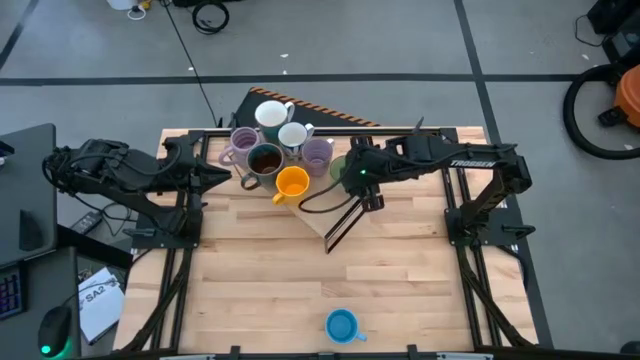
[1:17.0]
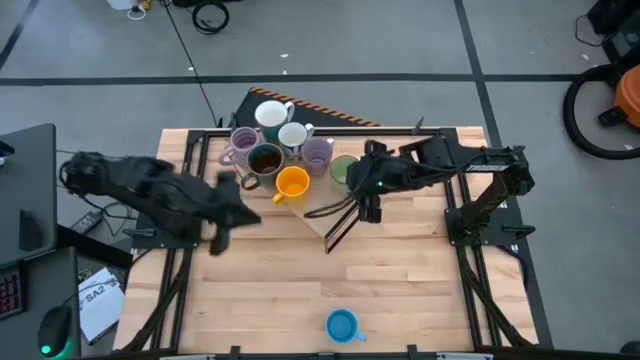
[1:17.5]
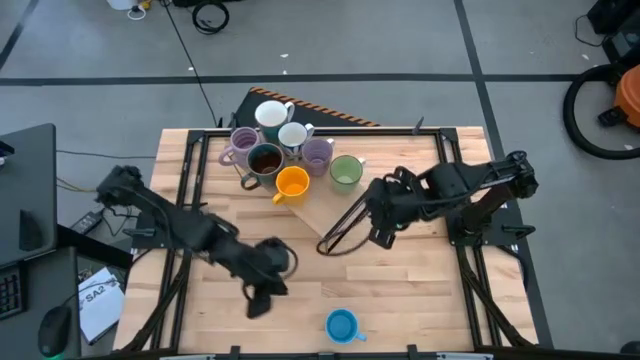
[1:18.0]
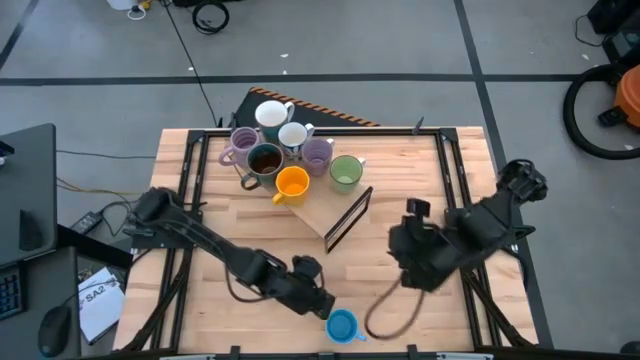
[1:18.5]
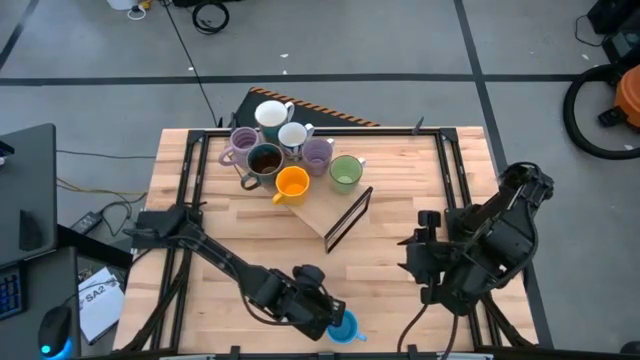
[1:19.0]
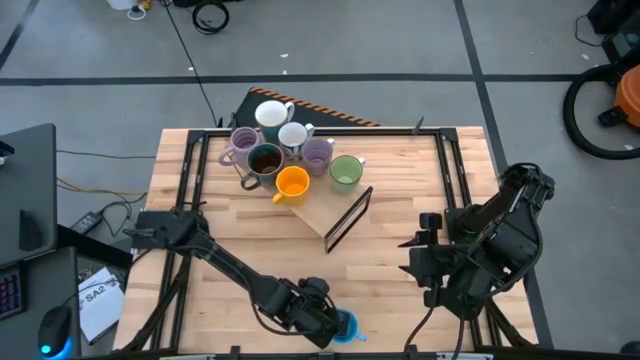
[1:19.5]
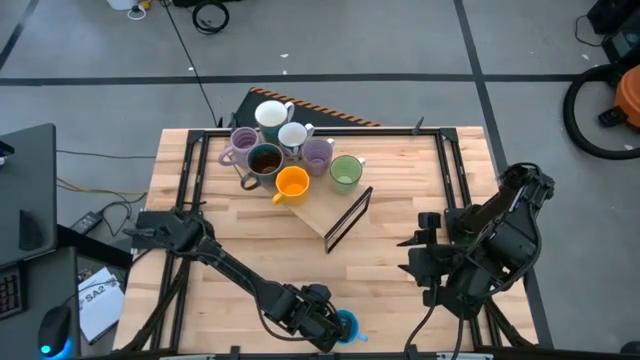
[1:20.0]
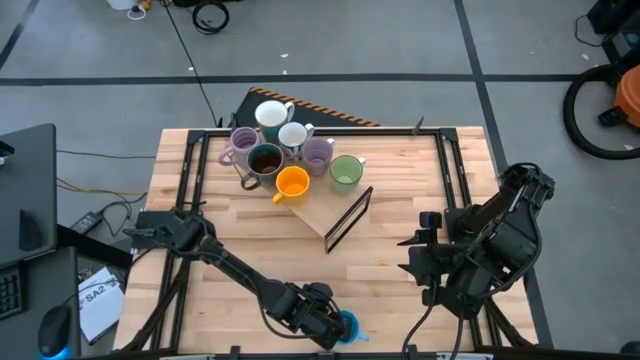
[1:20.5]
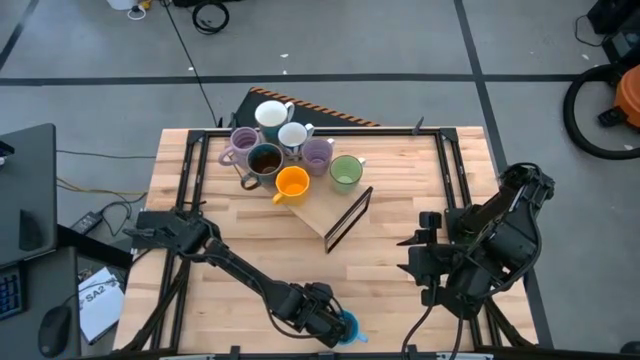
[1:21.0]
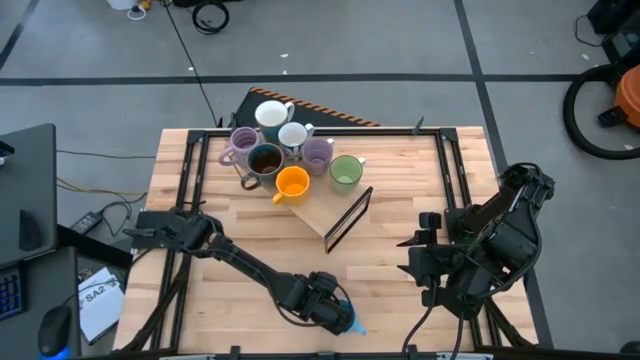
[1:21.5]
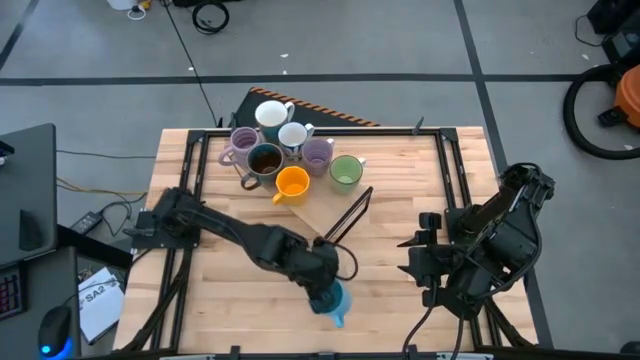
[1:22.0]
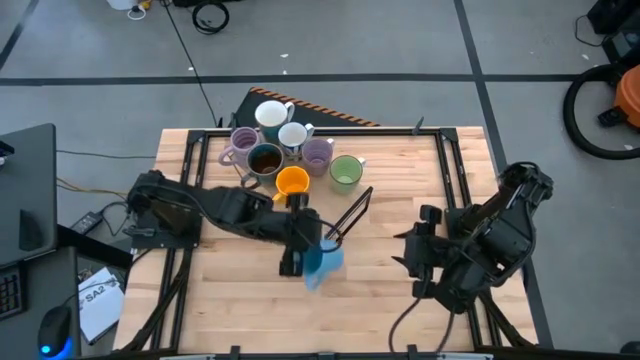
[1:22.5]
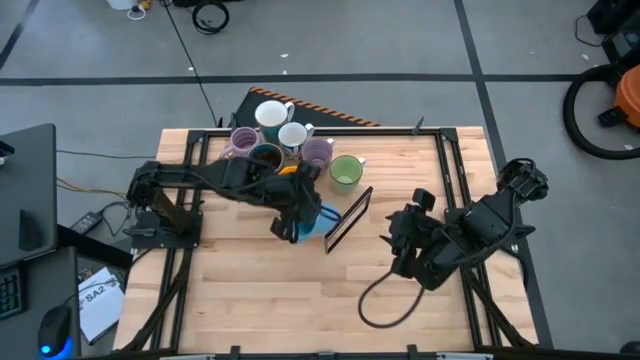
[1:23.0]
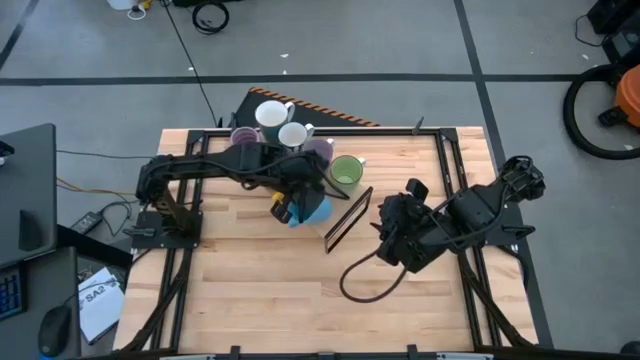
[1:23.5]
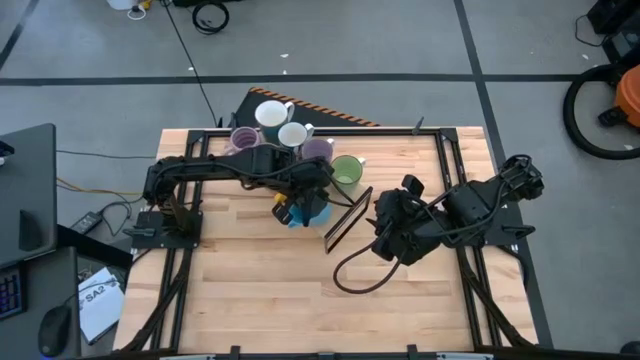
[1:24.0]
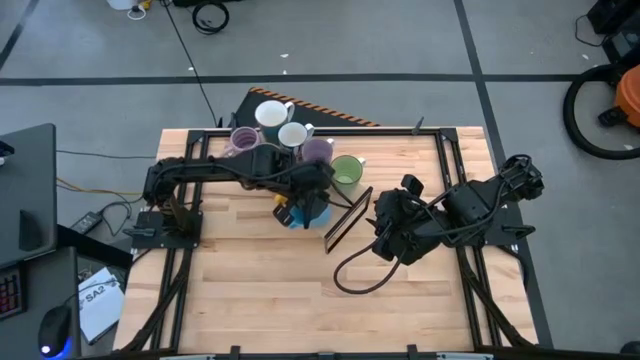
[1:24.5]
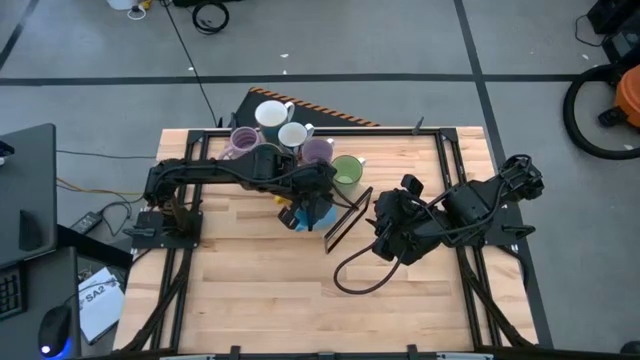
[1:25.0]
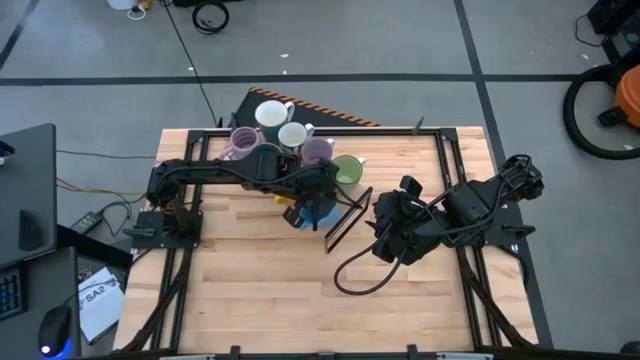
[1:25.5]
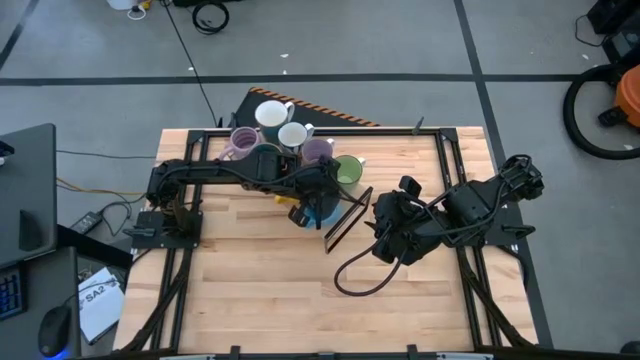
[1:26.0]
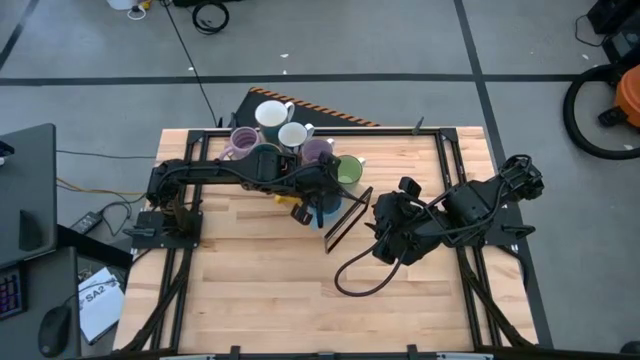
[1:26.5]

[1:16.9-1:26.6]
Task: Place coffee mugs
Put the blue mug on the shelf

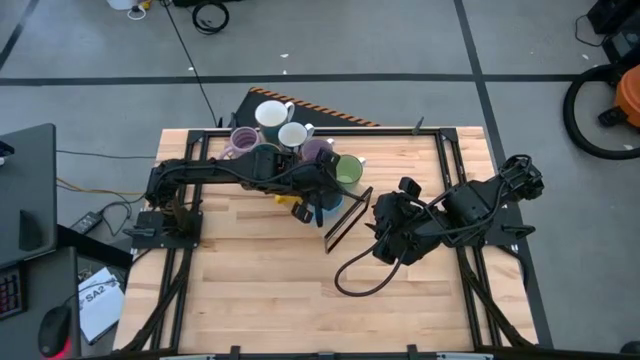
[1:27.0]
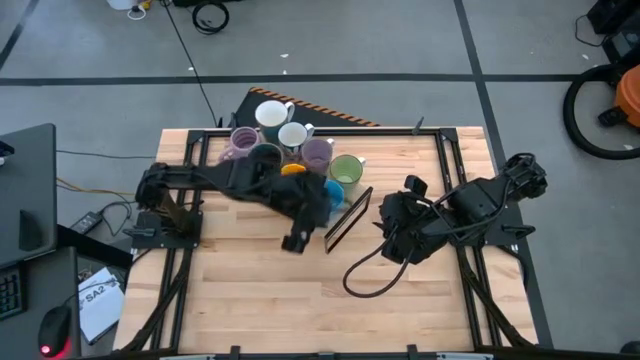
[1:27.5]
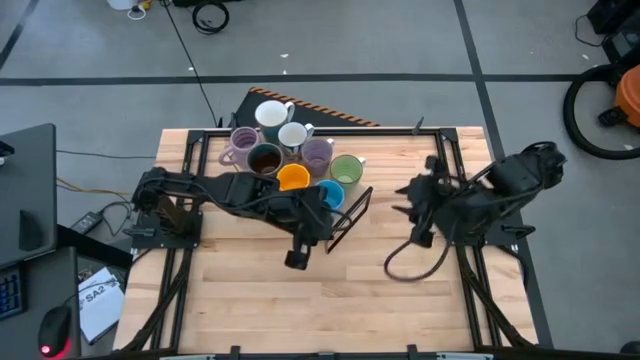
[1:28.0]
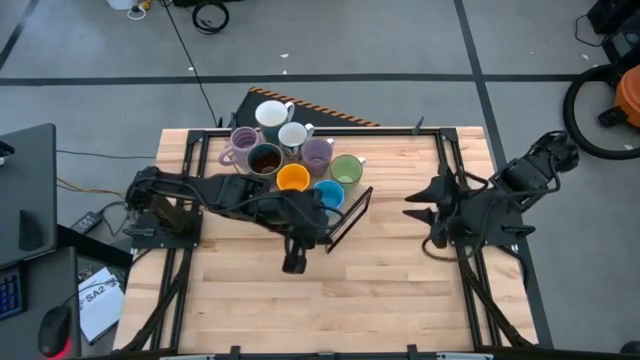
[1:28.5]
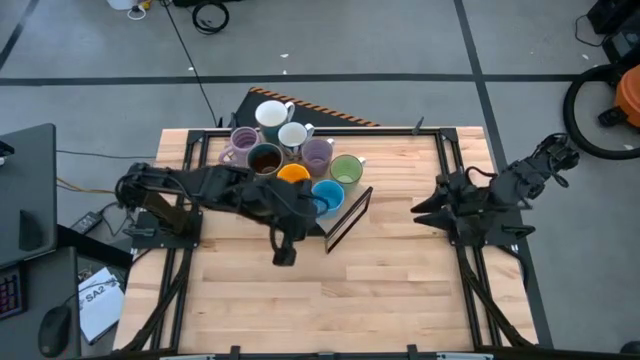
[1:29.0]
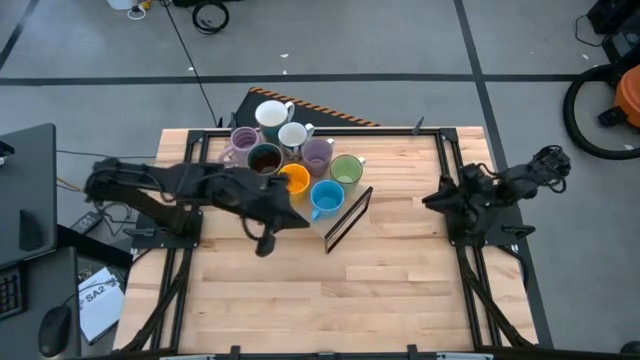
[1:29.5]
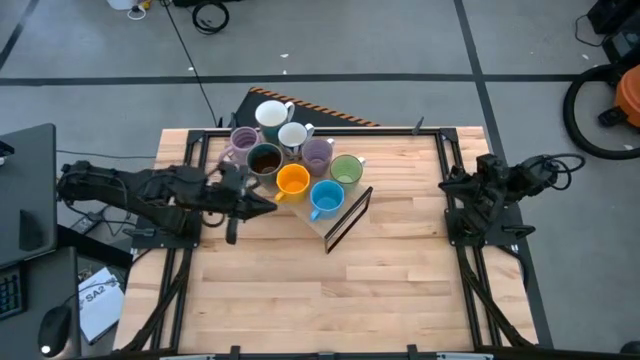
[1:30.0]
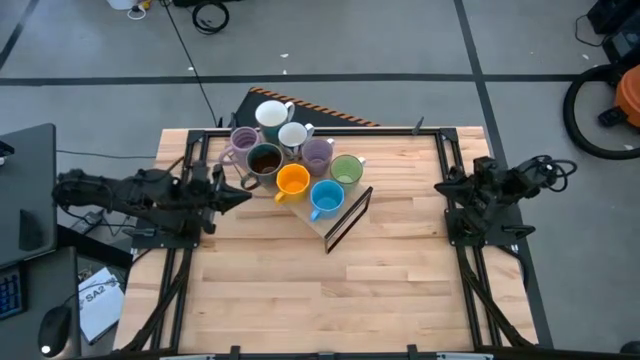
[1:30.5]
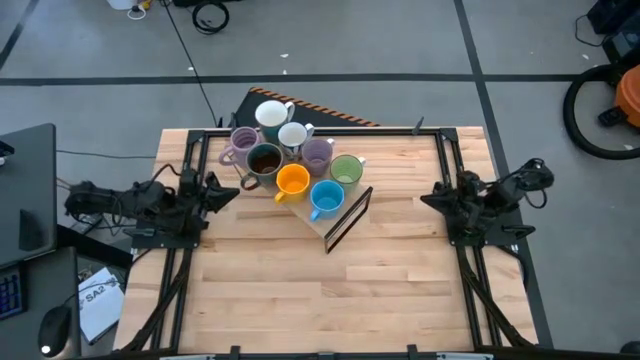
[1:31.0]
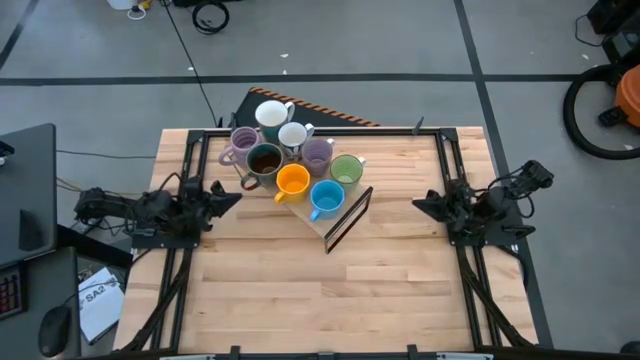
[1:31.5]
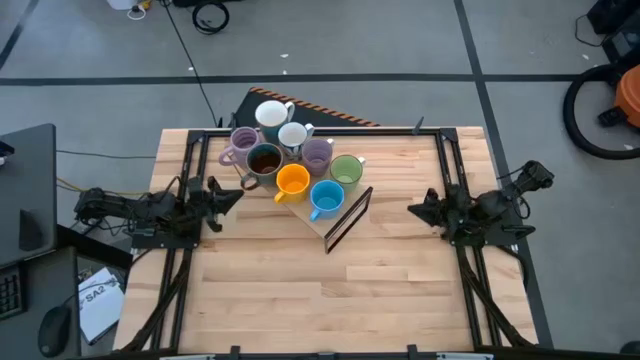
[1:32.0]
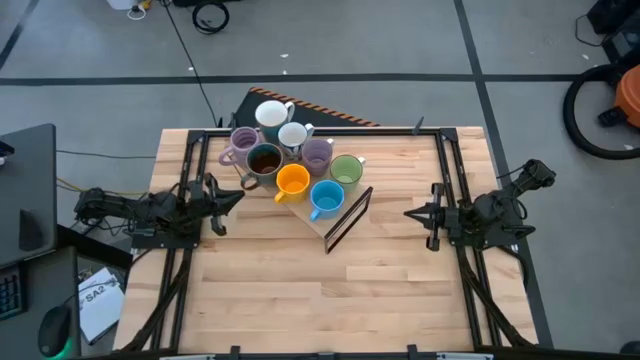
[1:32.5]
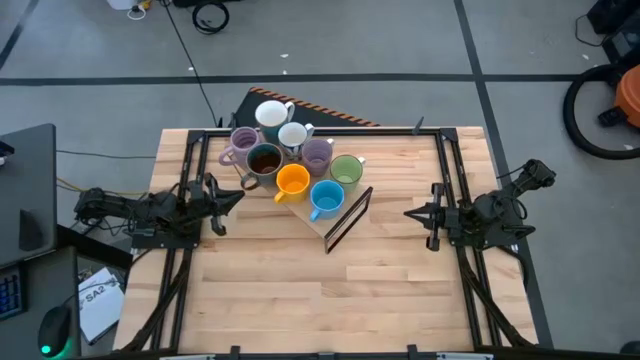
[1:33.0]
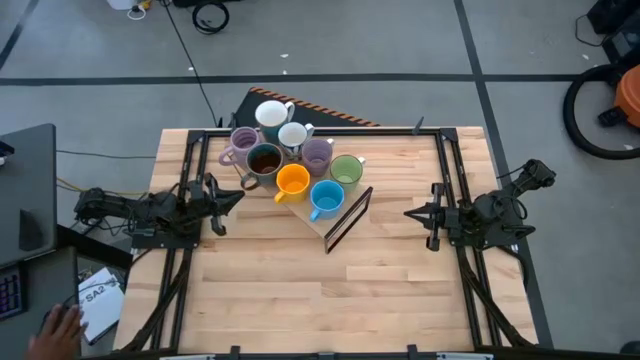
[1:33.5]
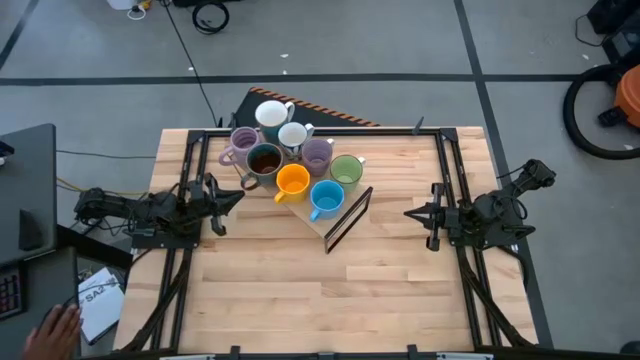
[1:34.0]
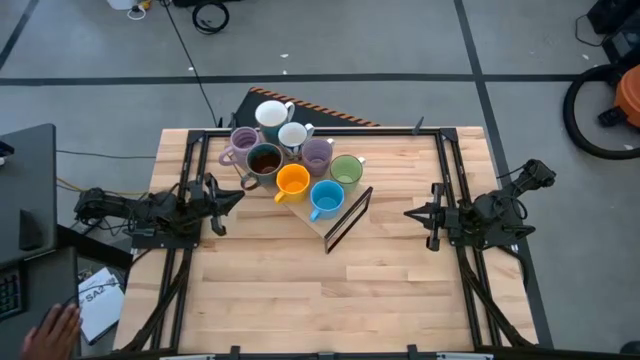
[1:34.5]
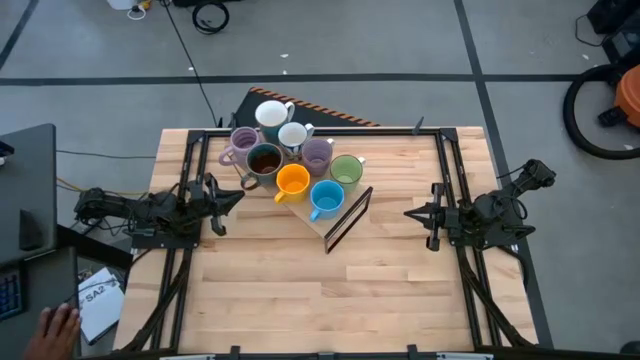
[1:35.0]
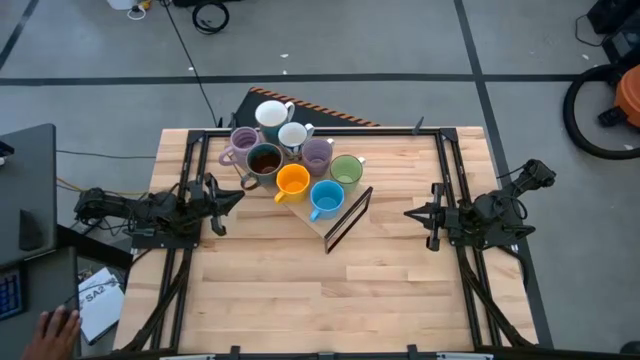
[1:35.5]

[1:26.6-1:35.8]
Return to Home Position
